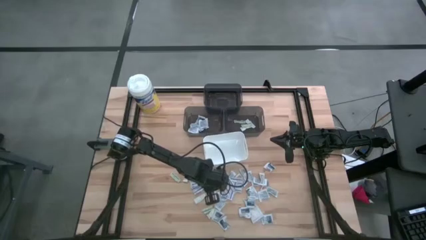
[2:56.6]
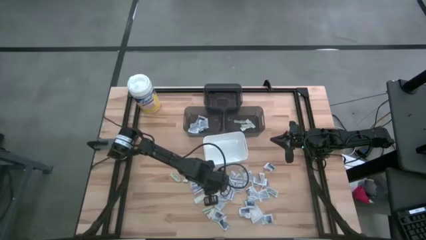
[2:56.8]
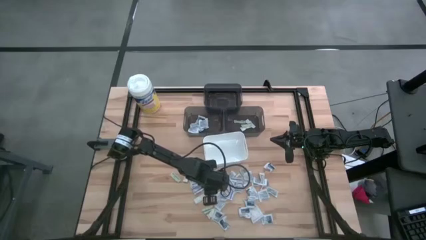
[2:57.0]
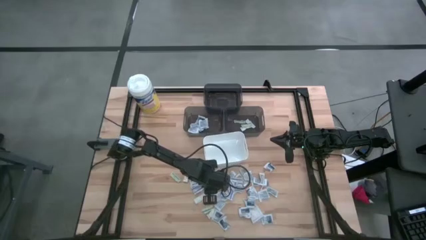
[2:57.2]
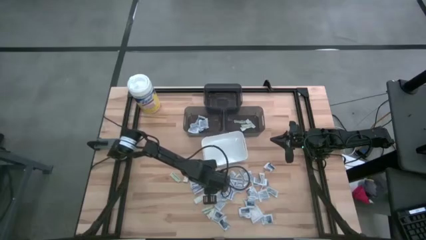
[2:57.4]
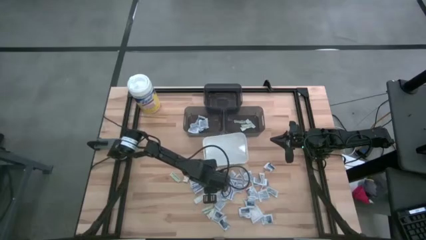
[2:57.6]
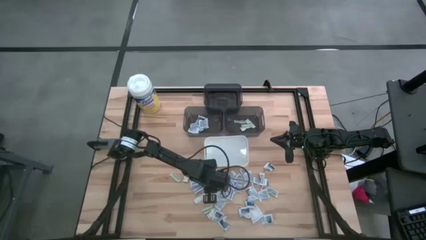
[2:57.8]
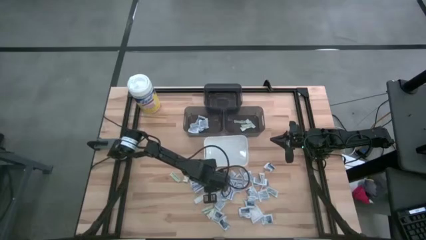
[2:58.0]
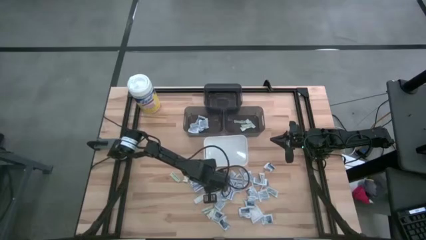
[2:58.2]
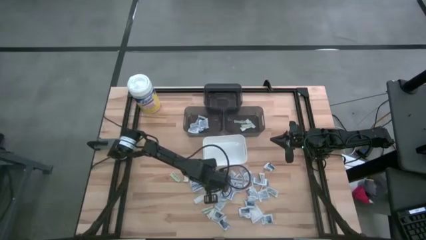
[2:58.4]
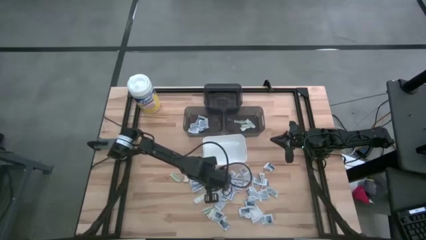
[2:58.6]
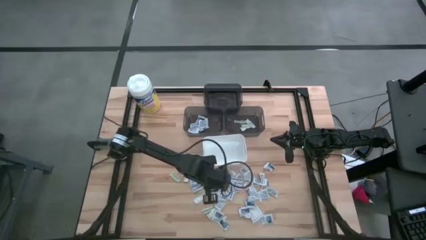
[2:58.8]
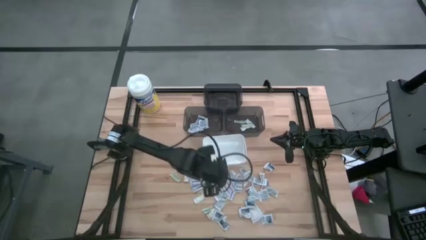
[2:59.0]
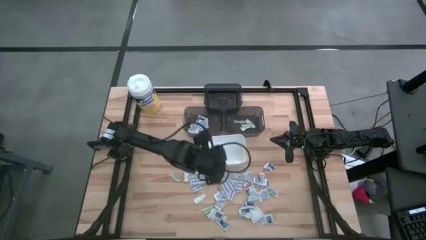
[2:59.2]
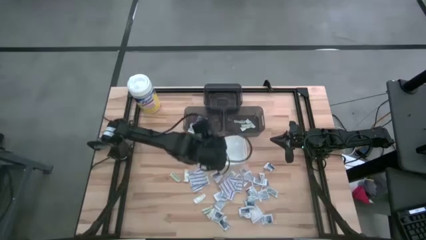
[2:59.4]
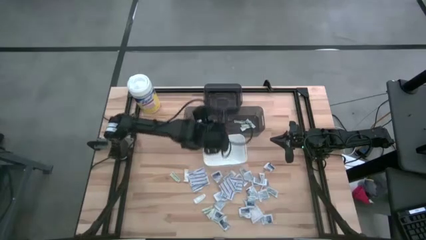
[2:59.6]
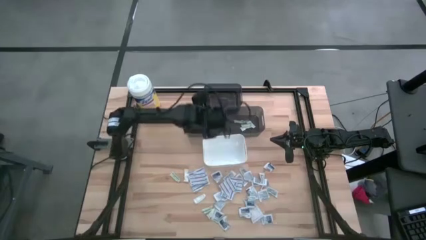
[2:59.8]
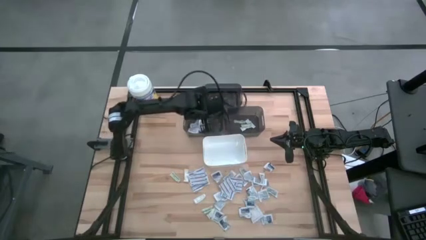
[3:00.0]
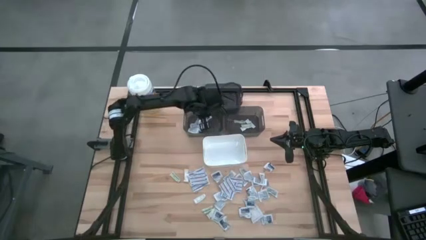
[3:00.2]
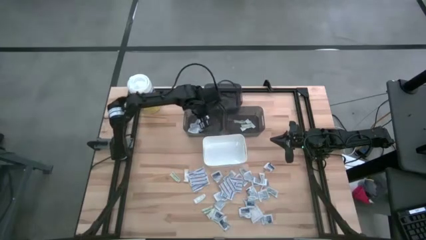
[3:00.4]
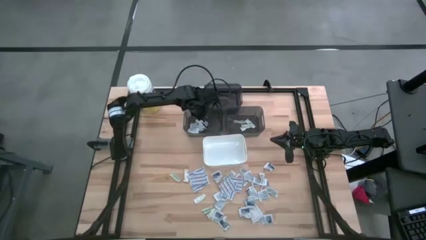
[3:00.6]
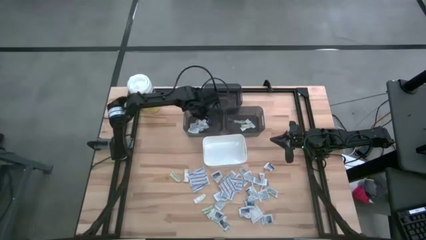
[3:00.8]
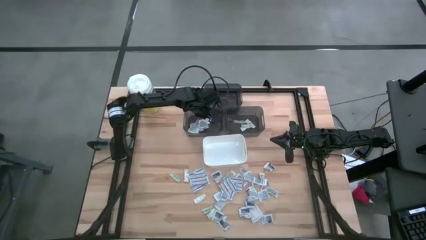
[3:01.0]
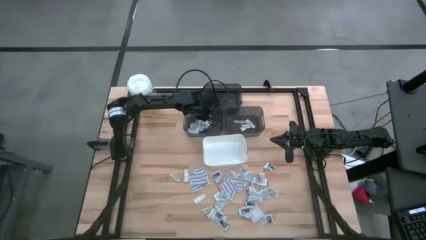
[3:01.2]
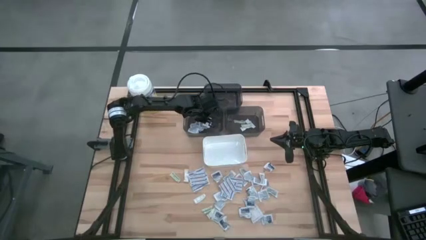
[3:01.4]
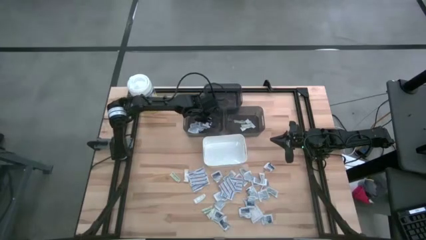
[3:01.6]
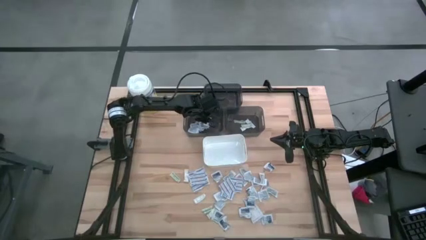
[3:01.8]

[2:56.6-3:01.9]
Task: Pick & Place First Aid Supplies
Put the alcohol pad into the bottom left black bin

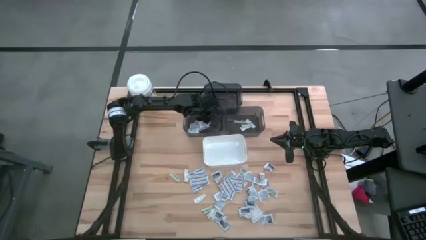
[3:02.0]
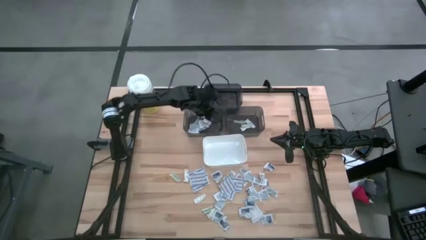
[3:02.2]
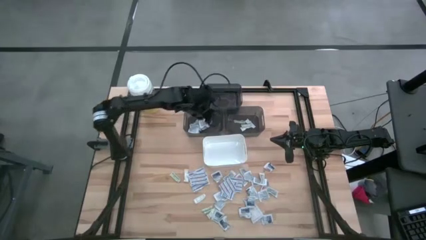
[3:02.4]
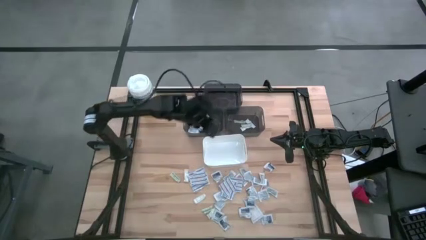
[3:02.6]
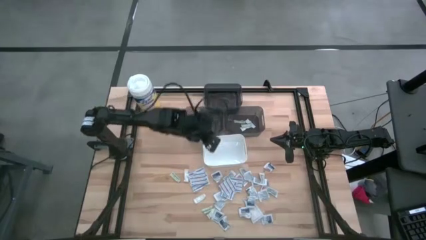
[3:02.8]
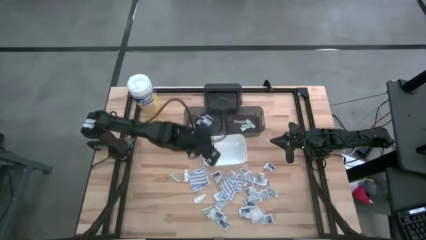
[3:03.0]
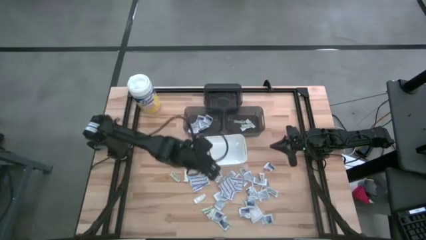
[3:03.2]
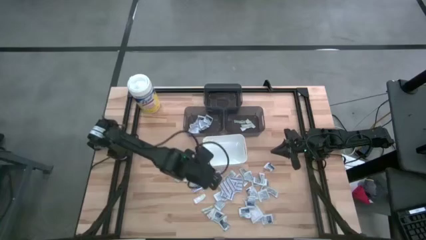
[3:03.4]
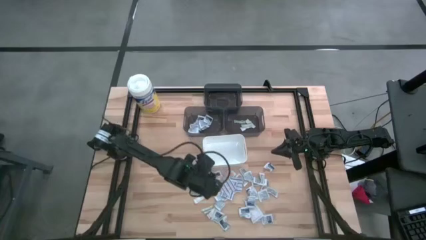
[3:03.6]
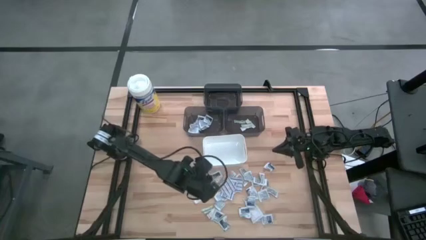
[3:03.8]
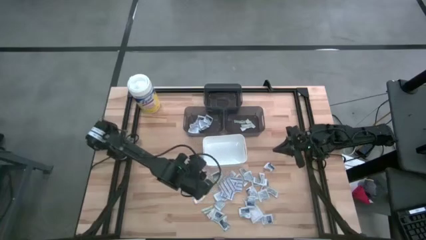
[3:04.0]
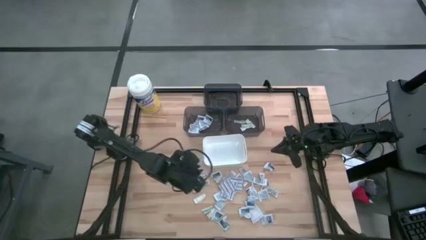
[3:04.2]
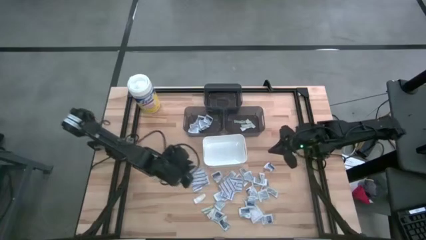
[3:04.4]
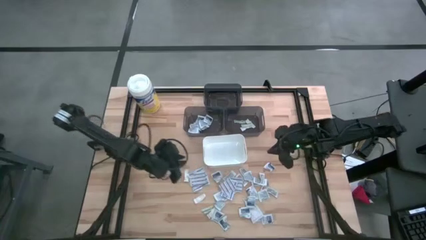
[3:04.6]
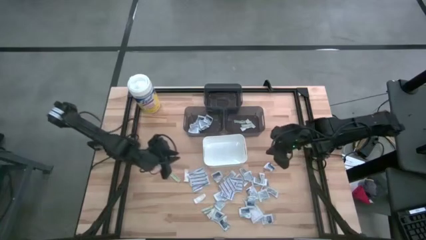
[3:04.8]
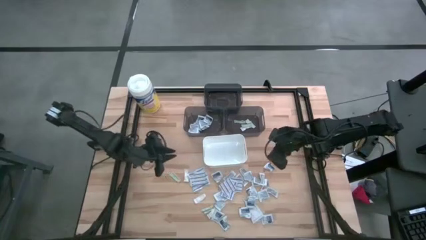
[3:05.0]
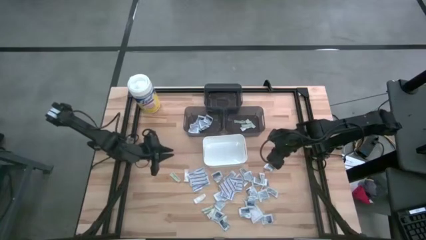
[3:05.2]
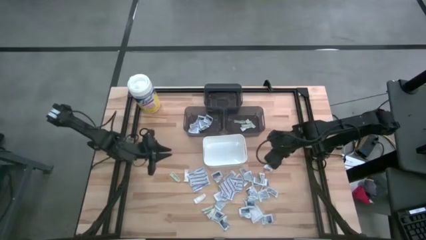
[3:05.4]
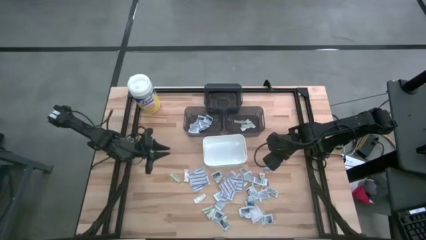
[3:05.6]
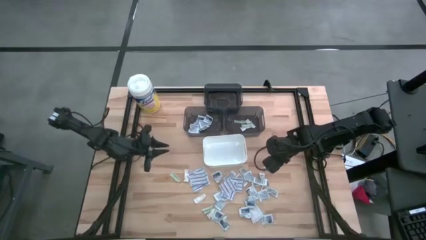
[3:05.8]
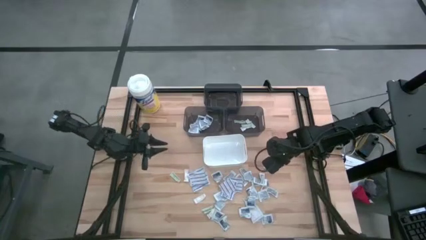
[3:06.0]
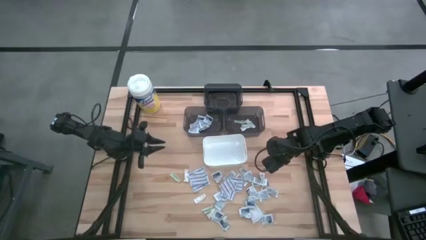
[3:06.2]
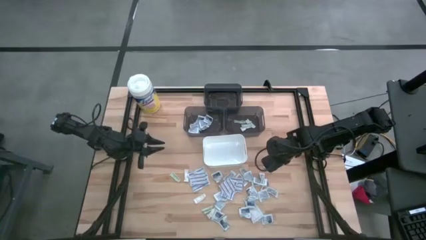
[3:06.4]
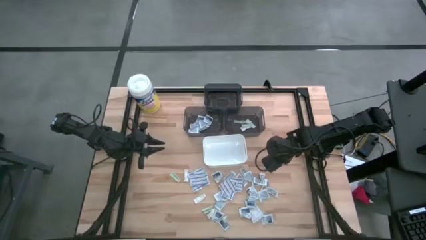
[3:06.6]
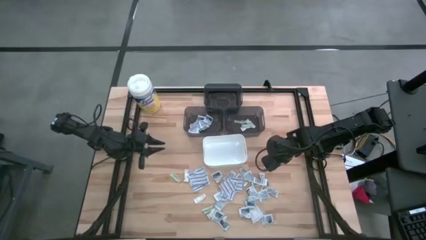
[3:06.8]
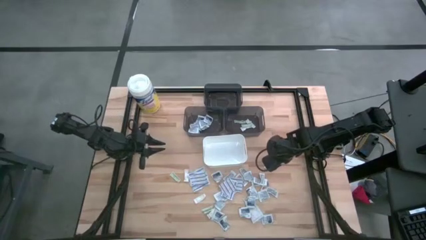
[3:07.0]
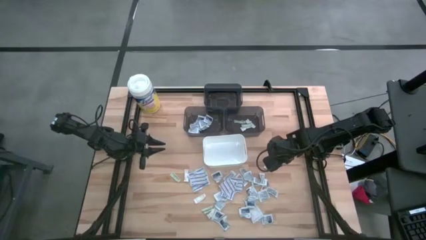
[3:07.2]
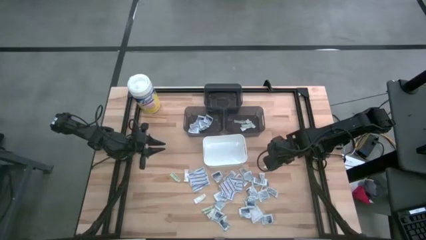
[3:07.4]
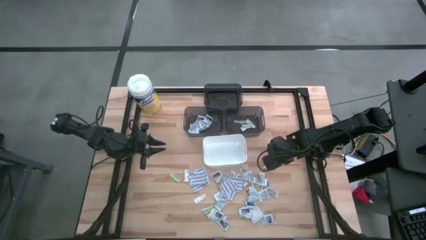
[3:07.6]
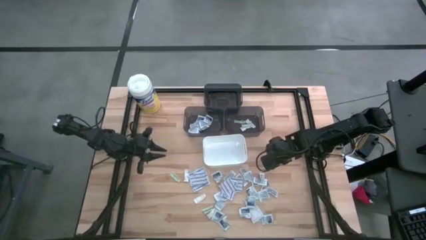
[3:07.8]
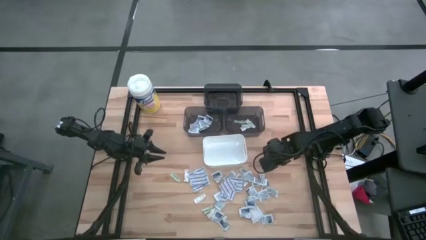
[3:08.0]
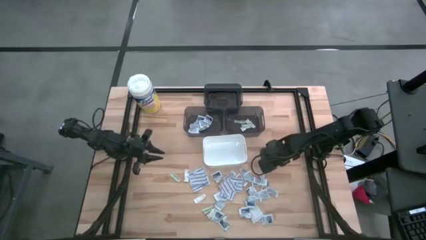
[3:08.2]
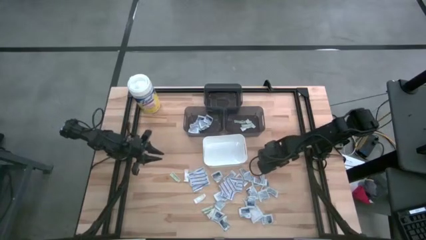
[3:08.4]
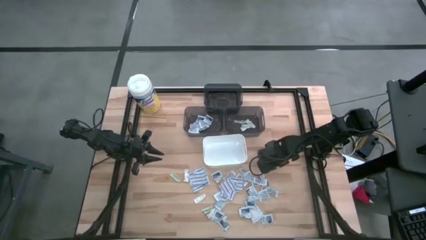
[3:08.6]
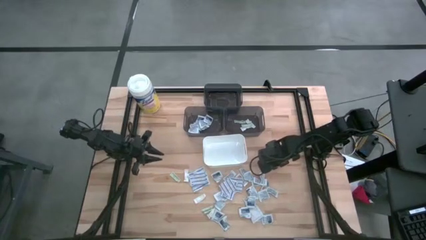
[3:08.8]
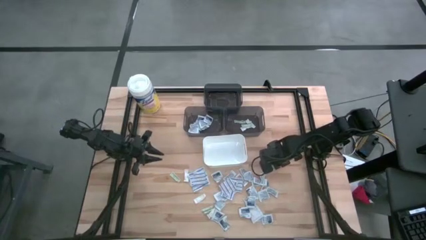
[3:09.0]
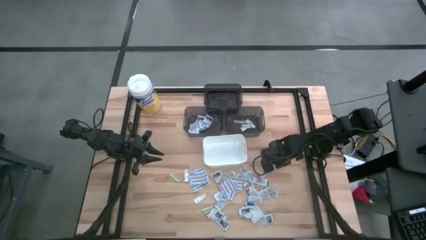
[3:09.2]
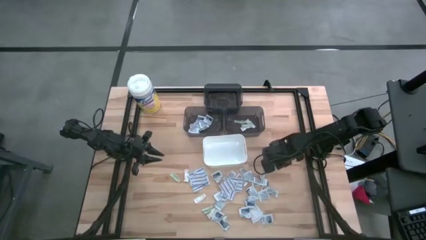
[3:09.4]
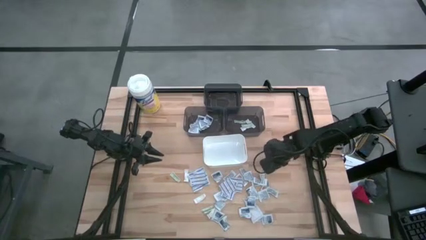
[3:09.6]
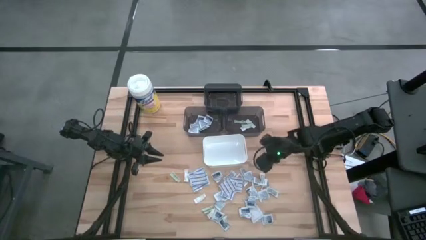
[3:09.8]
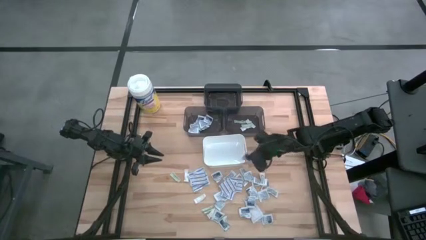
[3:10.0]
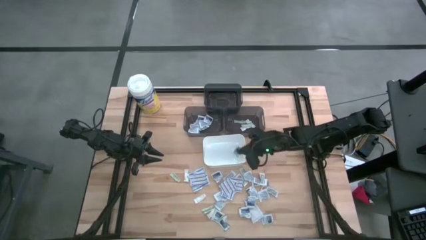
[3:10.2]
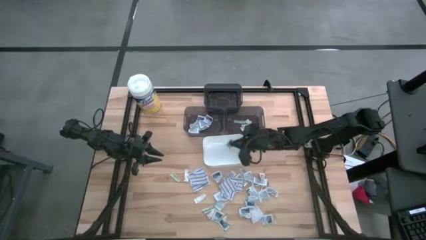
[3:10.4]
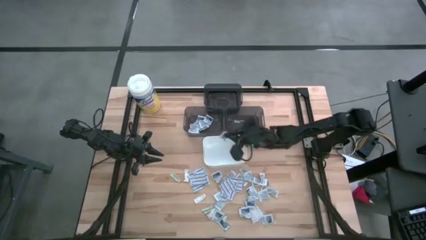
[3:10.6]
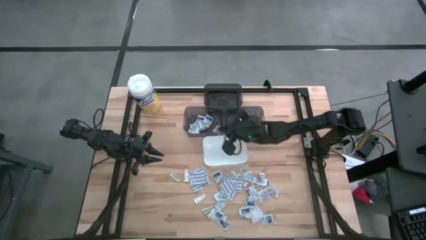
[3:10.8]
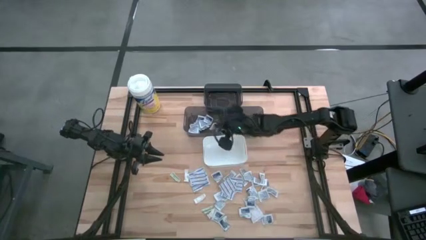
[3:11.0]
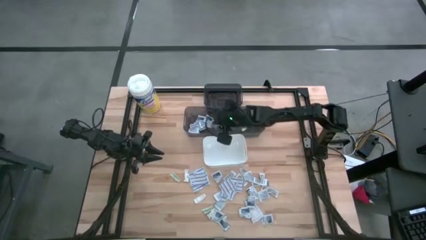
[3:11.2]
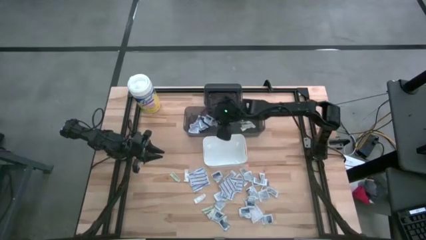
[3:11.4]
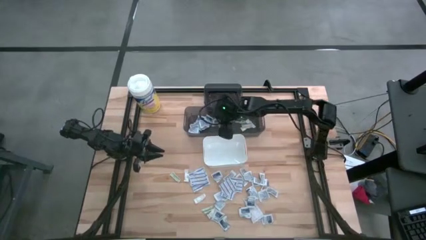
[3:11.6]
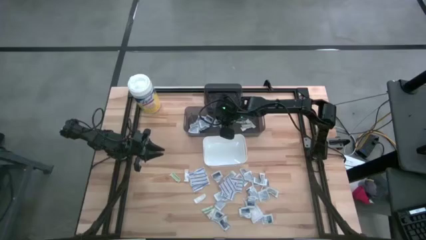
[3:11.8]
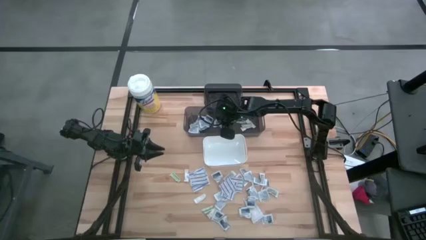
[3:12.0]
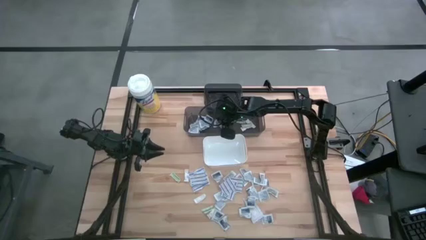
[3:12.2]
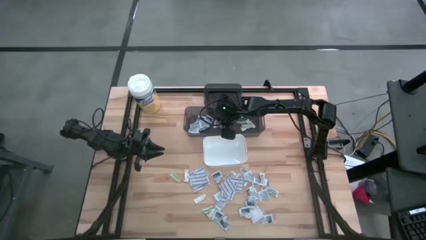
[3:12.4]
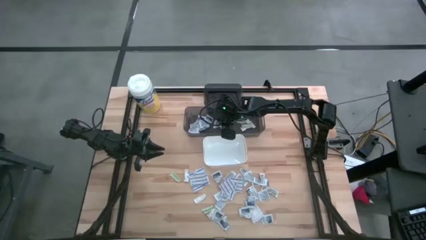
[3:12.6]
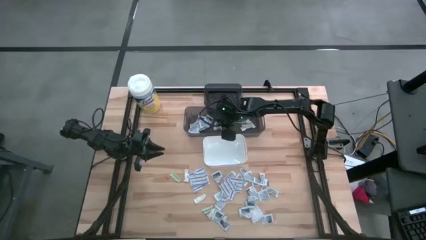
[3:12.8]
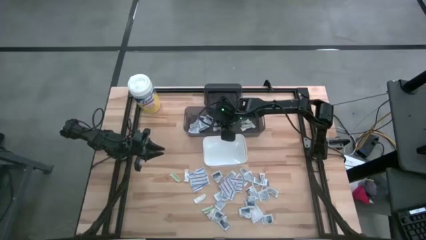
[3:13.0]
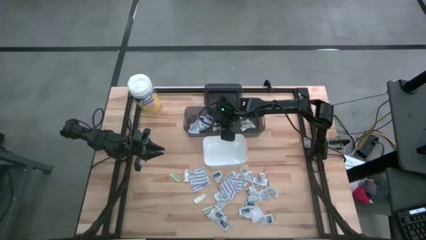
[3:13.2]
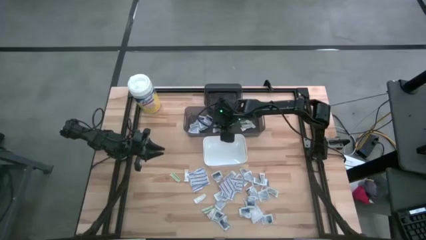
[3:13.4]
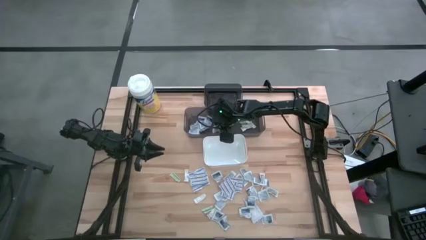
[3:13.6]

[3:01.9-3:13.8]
Put the alcohol pad into the bottom left black bin
